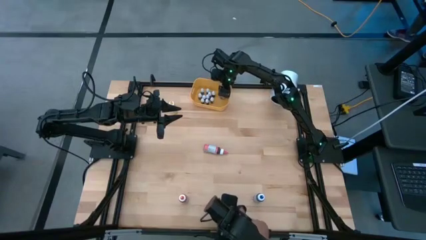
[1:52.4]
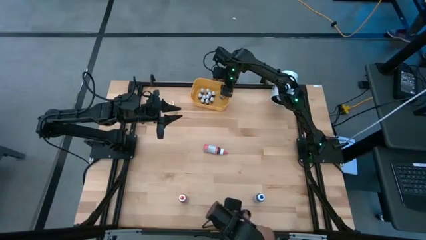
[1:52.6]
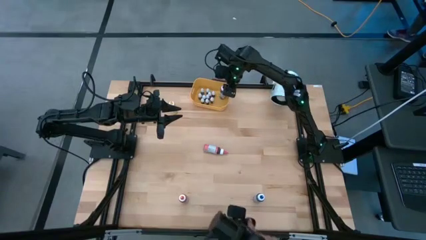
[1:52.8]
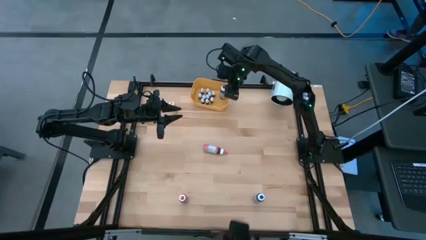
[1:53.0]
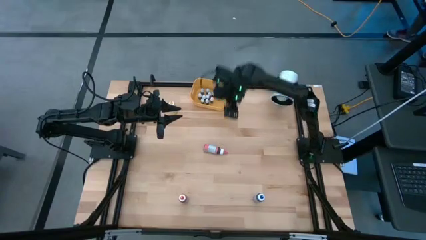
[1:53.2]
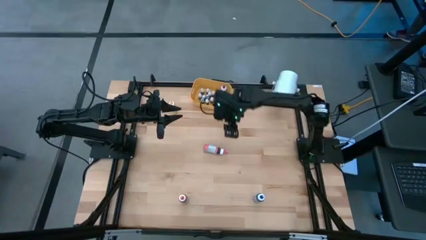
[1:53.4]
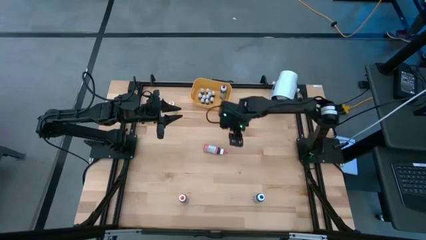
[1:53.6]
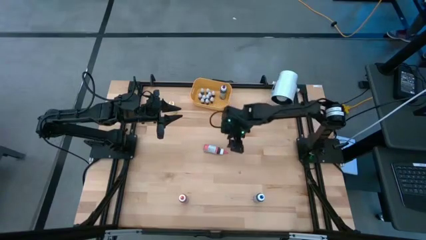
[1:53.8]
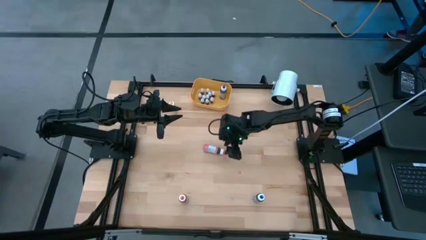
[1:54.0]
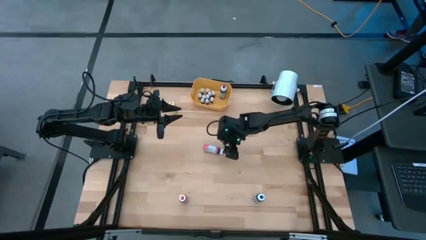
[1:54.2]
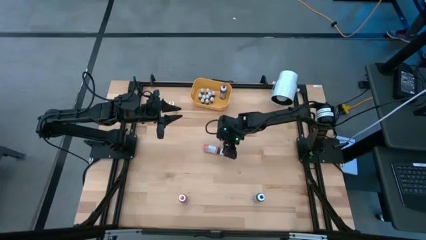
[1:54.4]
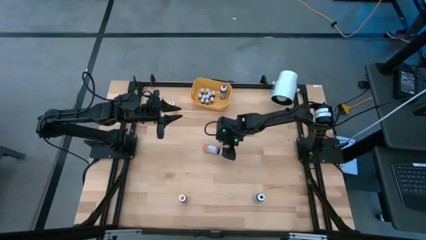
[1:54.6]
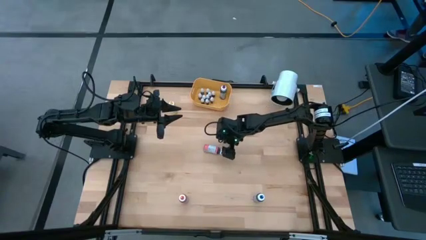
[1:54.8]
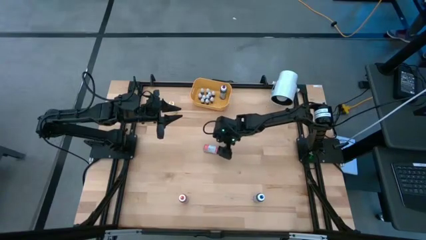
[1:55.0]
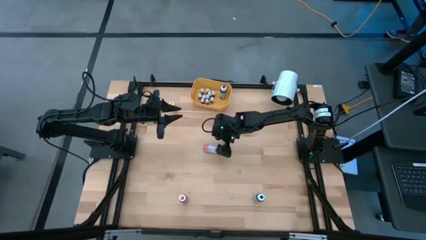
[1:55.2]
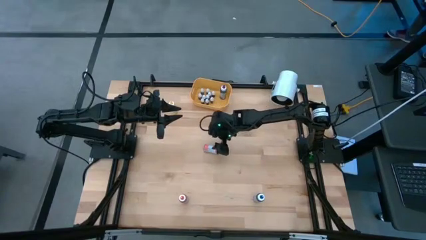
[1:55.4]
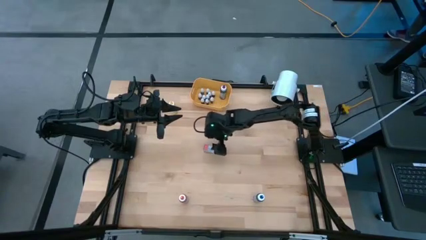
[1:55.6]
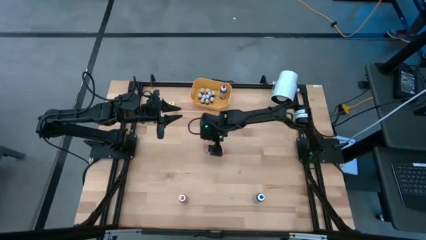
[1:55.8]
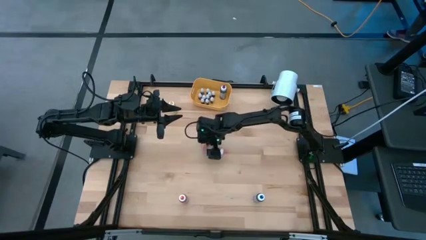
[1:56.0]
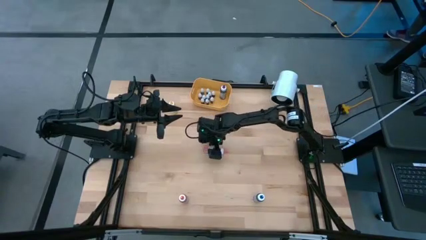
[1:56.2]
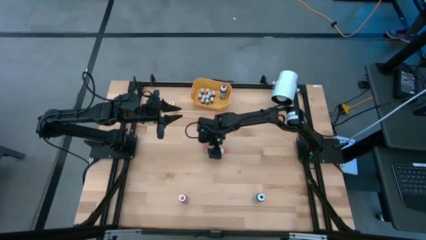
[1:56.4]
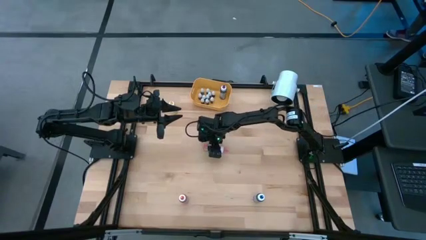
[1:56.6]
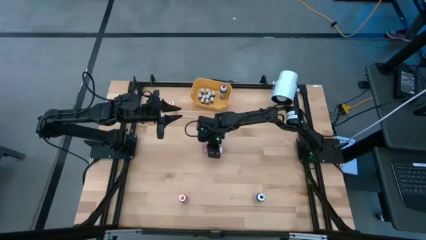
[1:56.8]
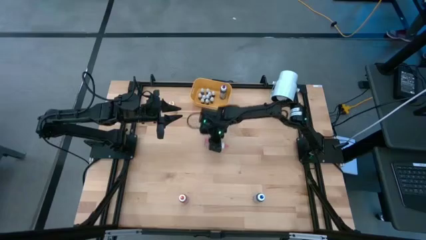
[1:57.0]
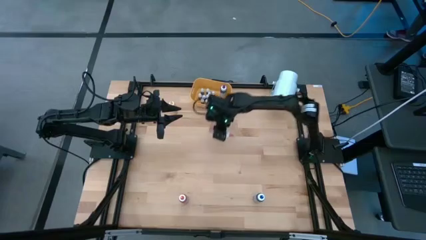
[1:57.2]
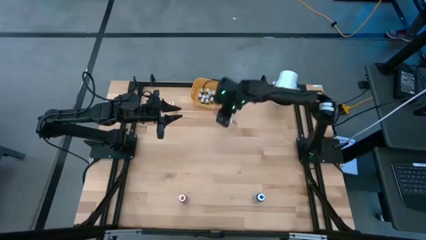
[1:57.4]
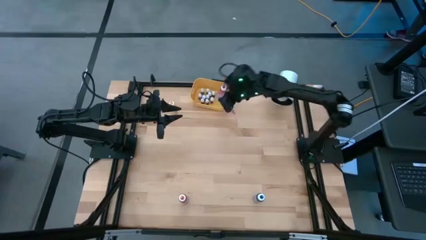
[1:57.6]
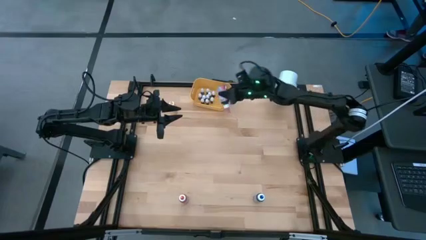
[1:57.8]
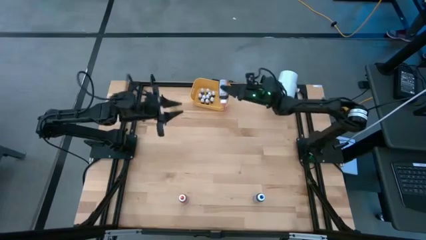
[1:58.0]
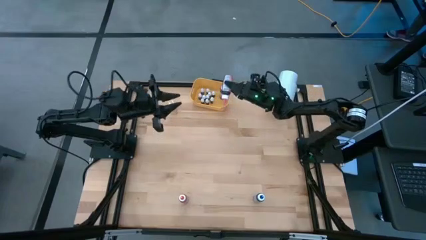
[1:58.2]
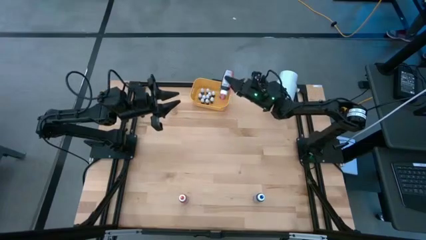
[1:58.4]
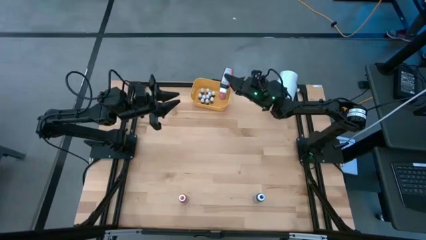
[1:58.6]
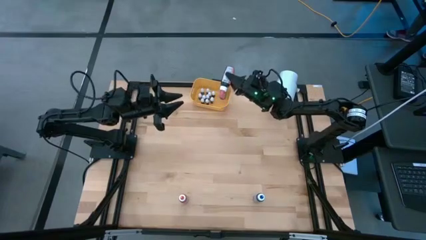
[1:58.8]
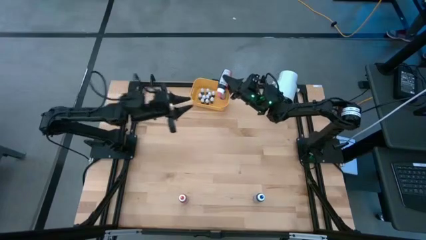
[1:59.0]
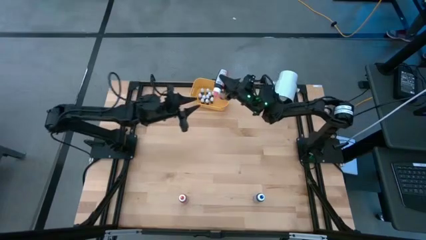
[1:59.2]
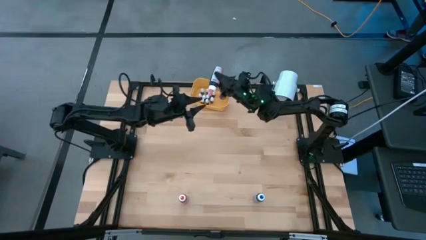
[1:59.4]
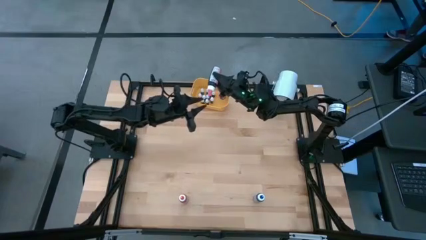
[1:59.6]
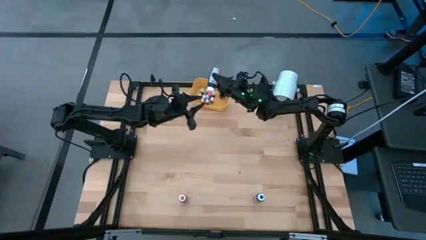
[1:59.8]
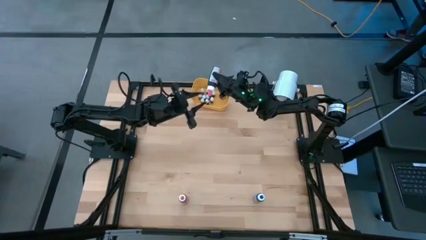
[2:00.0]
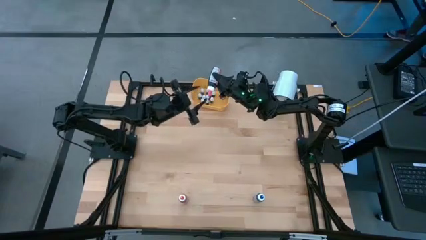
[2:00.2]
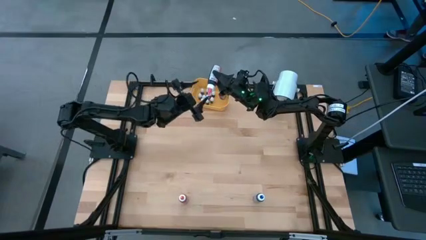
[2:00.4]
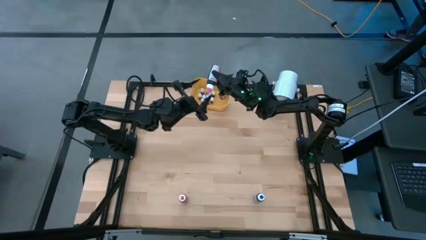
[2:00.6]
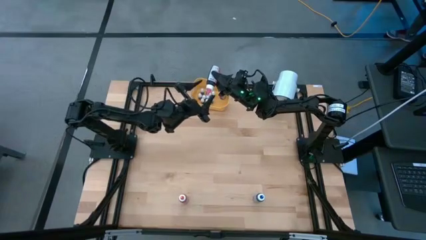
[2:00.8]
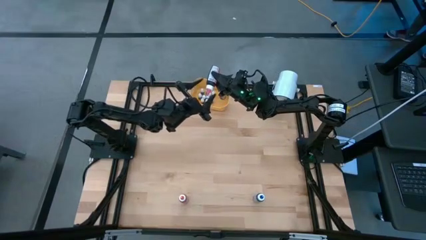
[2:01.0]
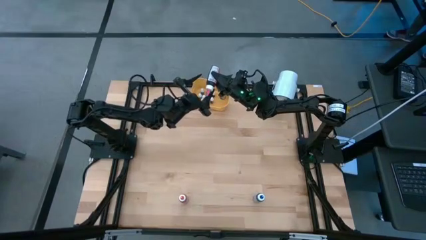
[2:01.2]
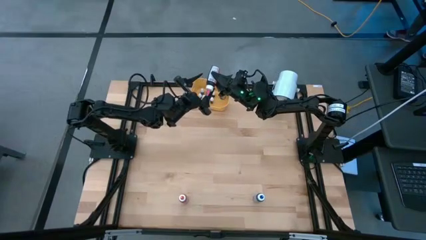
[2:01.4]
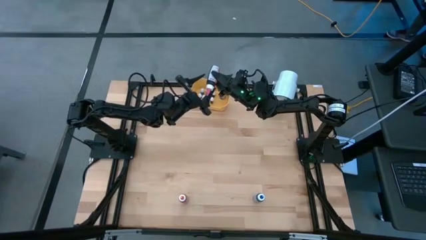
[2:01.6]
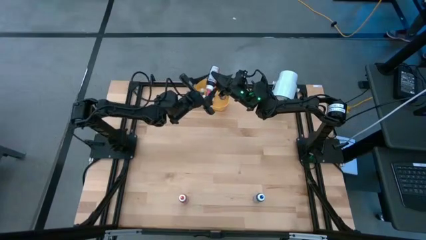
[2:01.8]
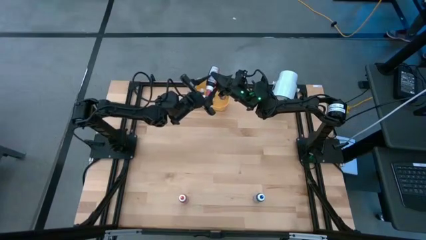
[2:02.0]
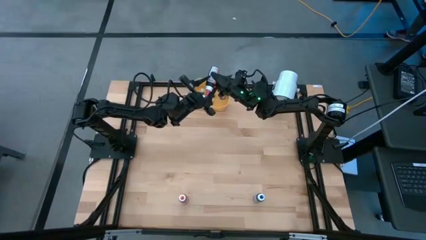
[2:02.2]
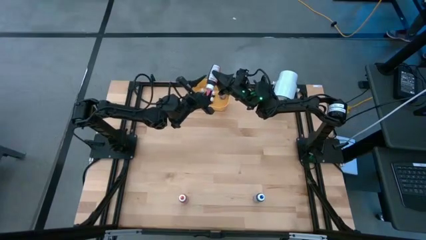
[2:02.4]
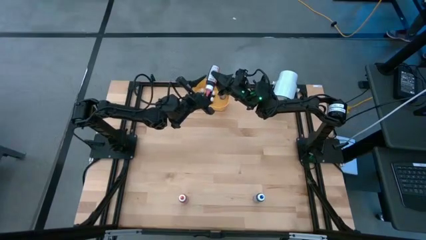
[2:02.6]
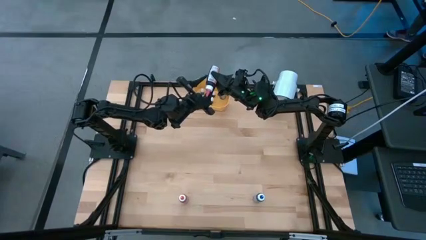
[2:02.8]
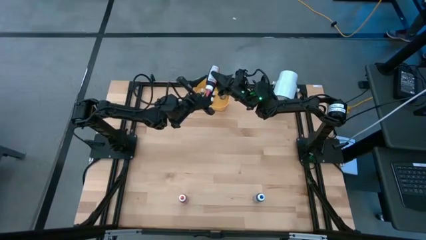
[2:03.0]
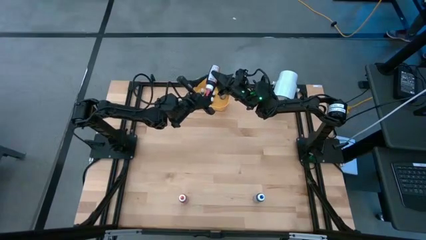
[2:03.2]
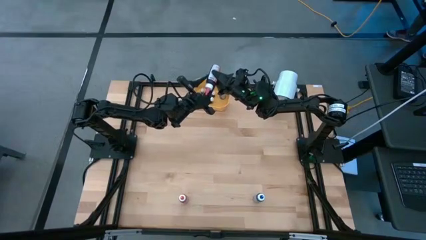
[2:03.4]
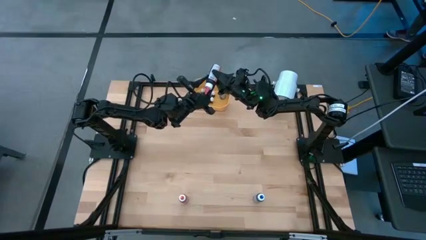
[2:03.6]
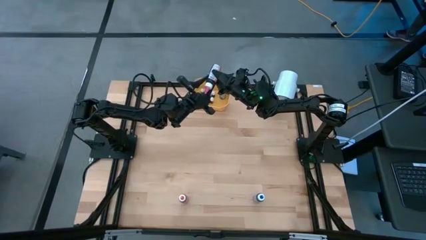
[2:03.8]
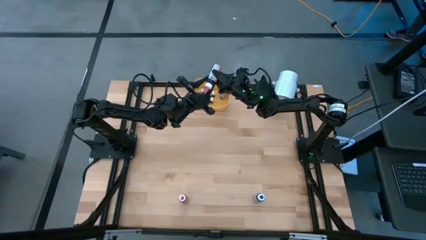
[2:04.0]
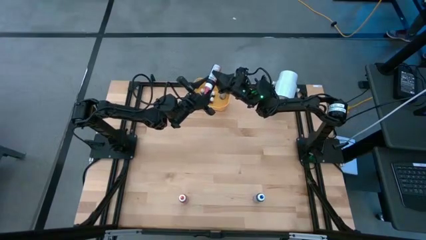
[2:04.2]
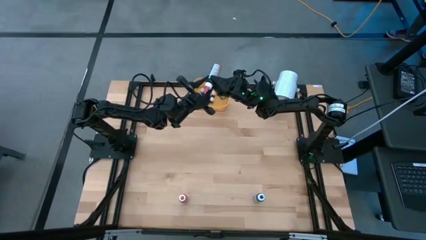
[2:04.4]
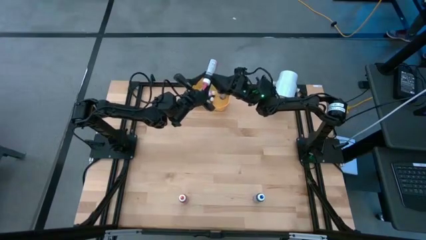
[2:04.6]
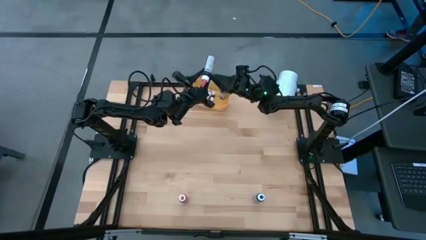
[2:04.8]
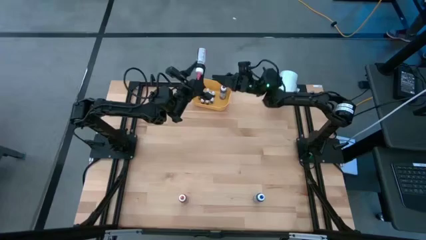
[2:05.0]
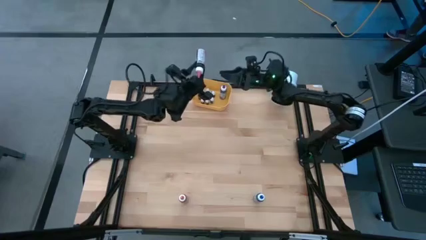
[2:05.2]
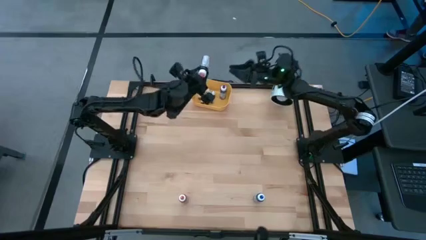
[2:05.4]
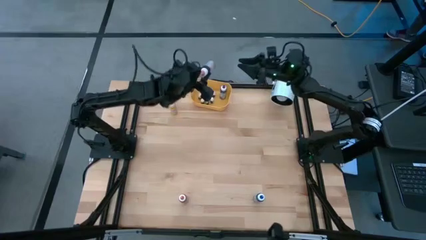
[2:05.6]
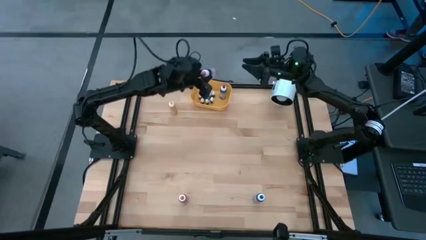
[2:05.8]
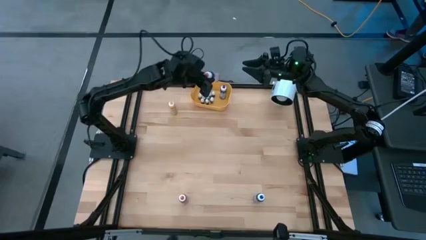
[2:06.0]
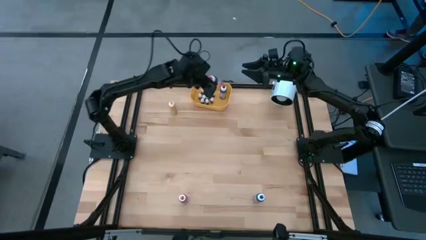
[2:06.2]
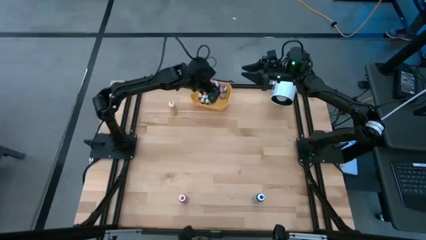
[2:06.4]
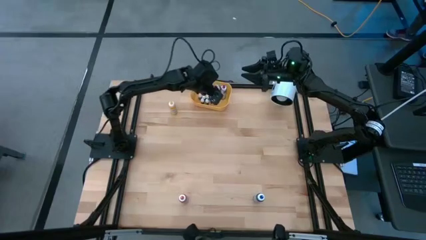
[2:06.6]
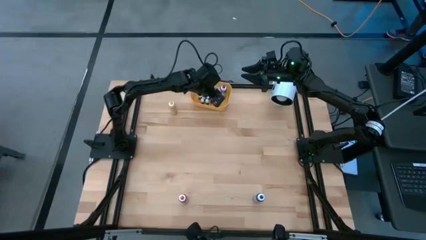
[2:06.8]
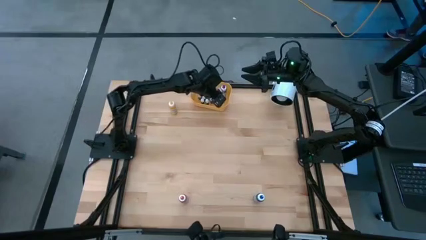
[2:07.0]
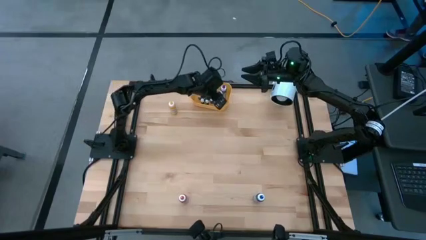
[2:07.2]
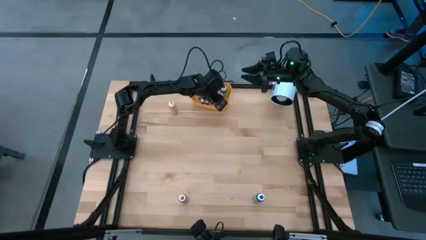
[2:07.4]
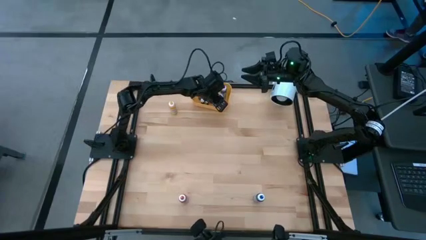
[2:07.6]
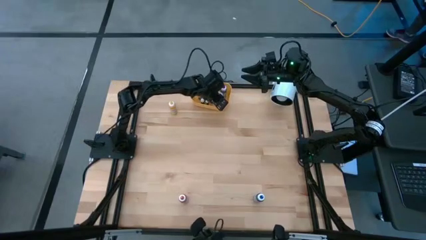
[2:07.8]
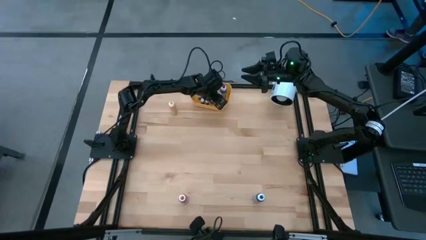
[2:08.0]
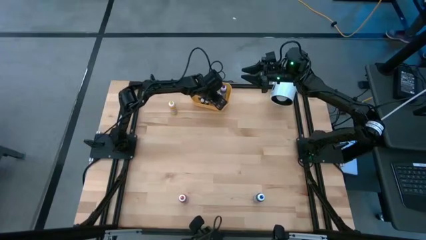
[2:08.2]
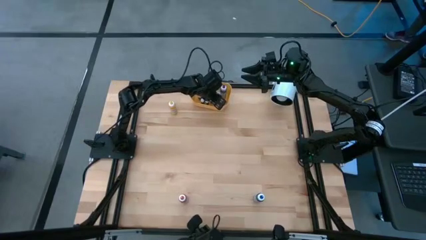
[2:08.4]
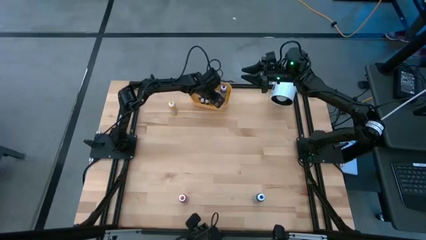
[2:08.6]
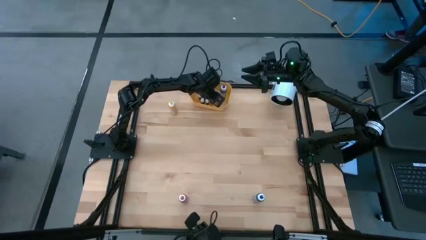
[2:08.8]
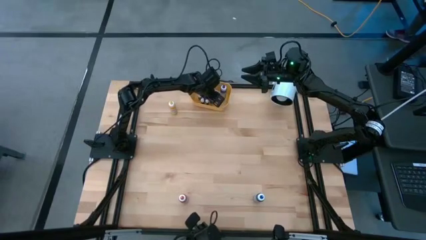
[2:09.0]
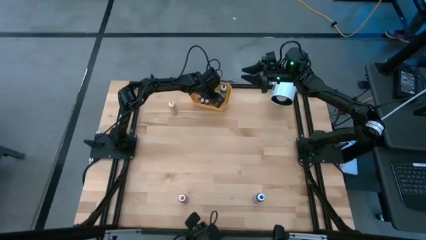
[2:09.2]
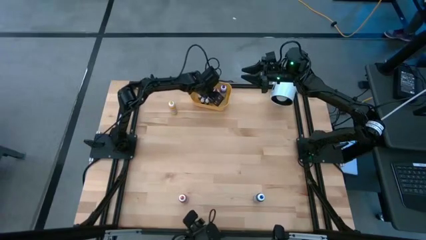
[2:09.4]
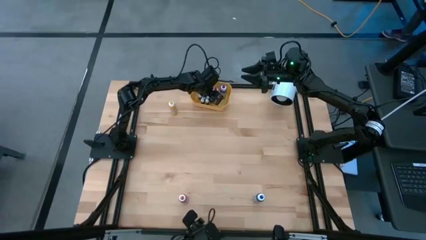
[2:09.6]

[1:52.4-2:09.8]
Task: Pick & Place food coloring
Put the large pink food coloring bottle into the bin
